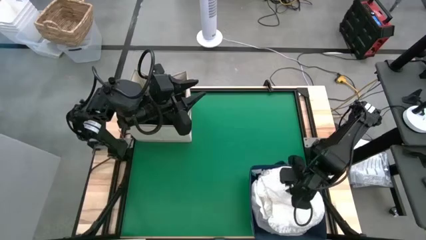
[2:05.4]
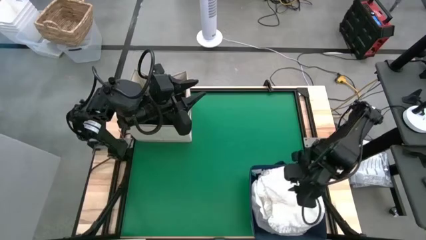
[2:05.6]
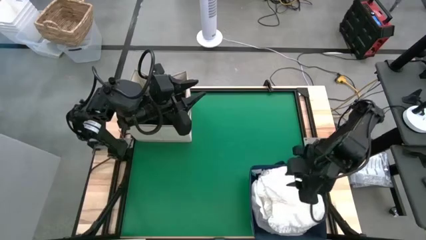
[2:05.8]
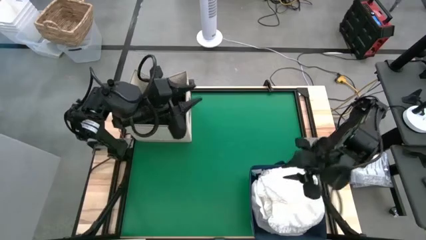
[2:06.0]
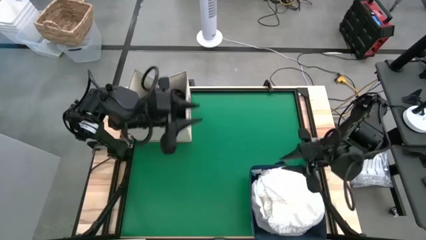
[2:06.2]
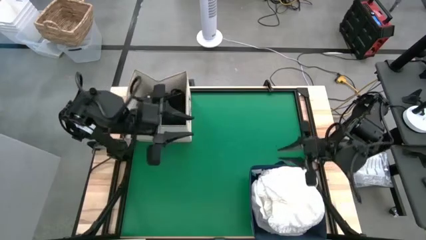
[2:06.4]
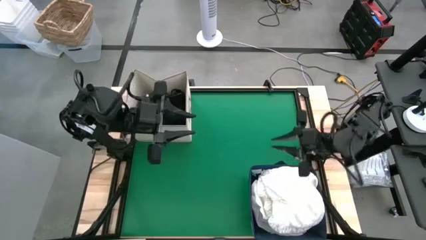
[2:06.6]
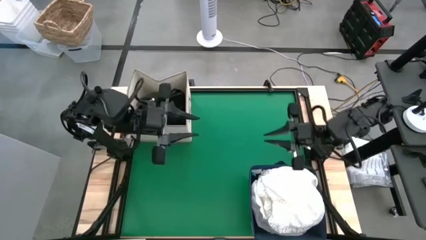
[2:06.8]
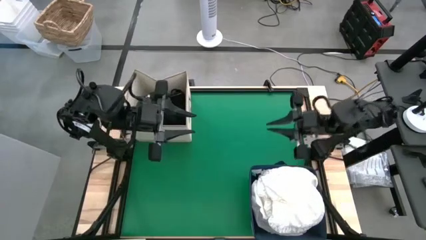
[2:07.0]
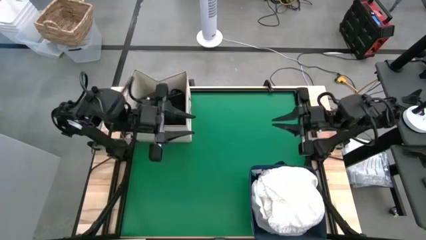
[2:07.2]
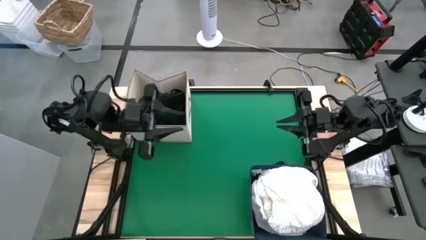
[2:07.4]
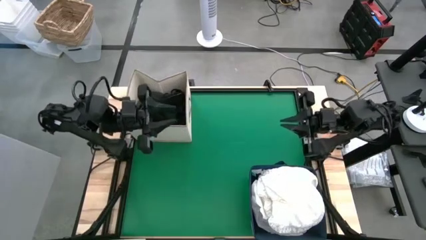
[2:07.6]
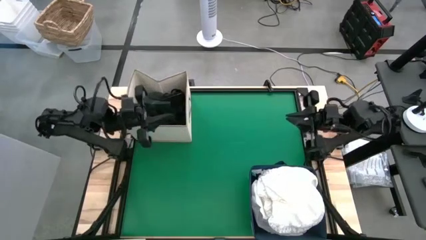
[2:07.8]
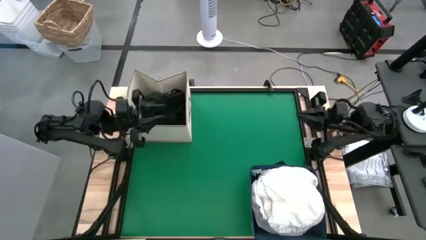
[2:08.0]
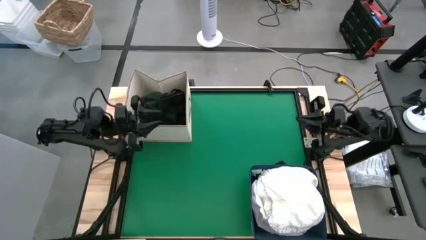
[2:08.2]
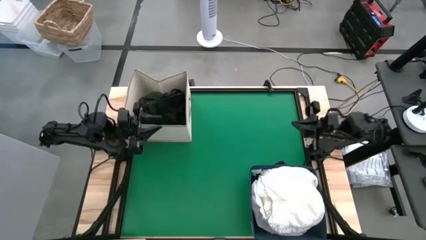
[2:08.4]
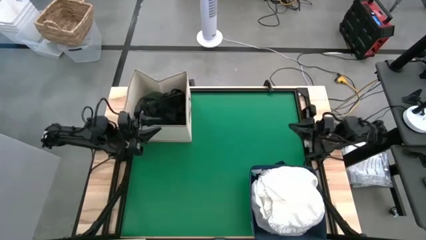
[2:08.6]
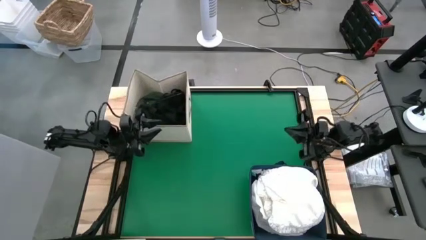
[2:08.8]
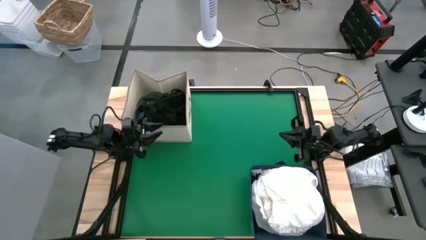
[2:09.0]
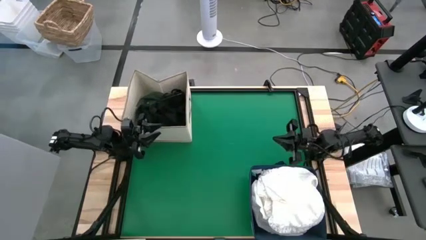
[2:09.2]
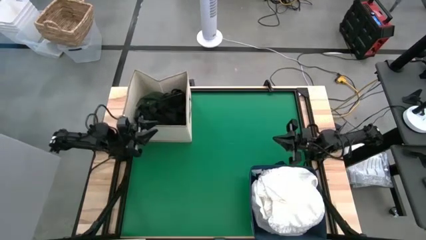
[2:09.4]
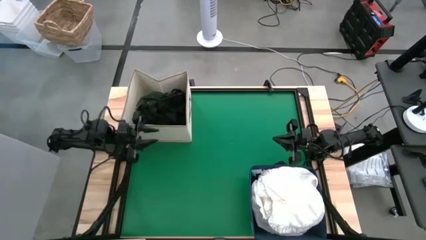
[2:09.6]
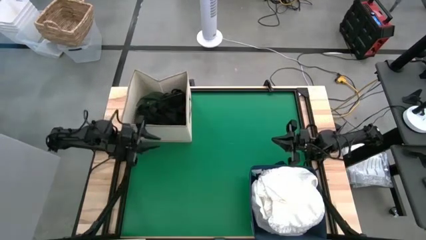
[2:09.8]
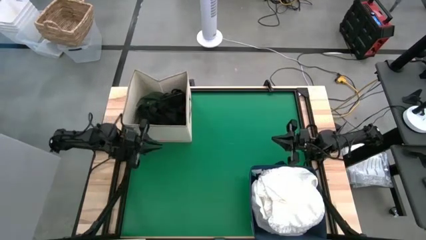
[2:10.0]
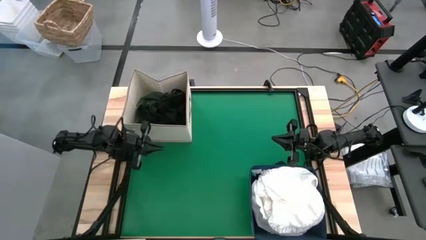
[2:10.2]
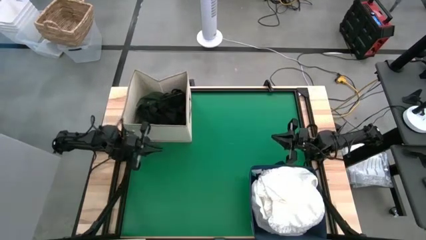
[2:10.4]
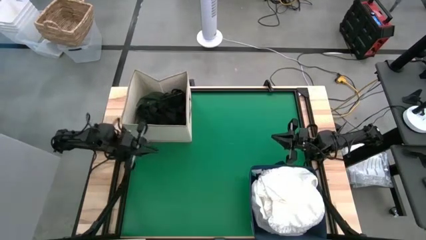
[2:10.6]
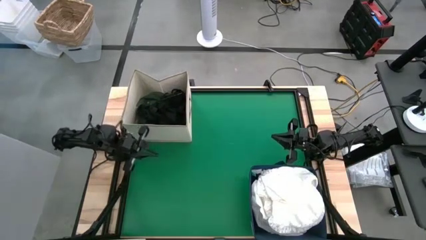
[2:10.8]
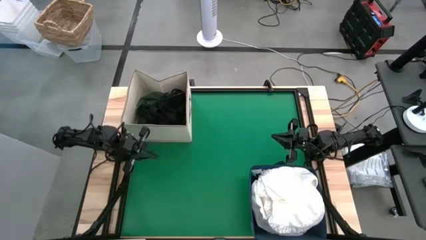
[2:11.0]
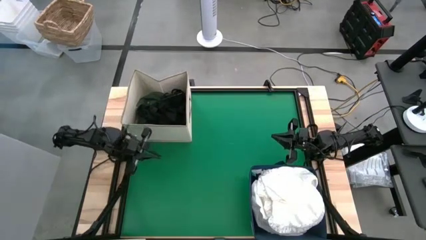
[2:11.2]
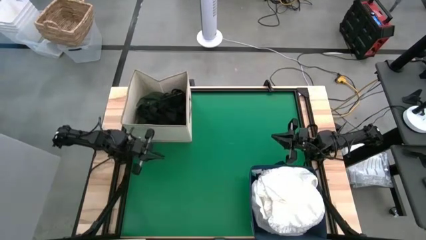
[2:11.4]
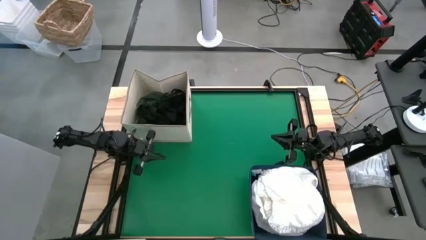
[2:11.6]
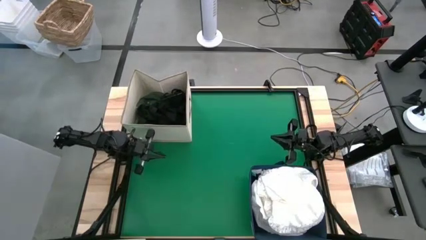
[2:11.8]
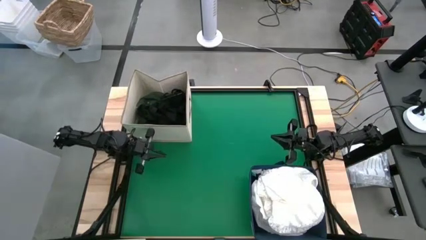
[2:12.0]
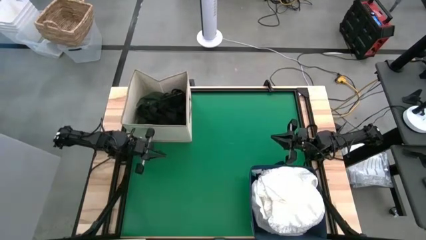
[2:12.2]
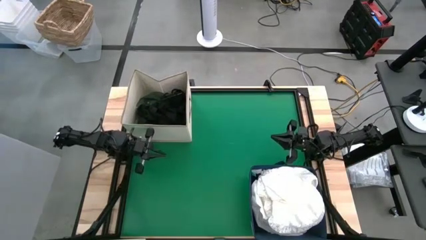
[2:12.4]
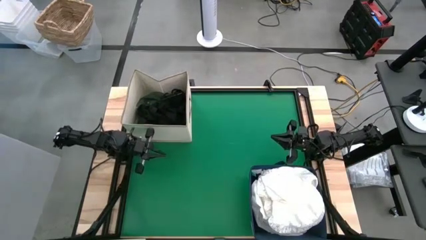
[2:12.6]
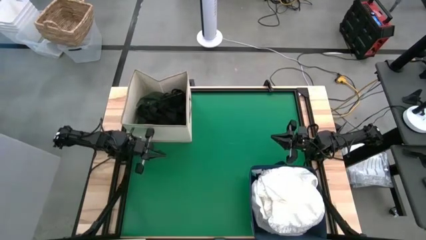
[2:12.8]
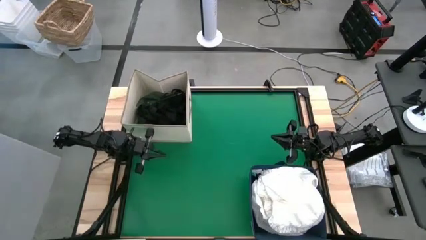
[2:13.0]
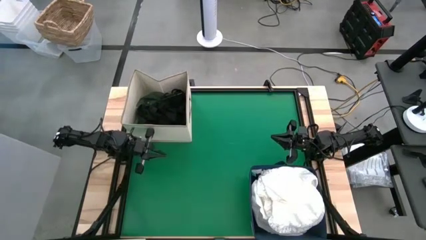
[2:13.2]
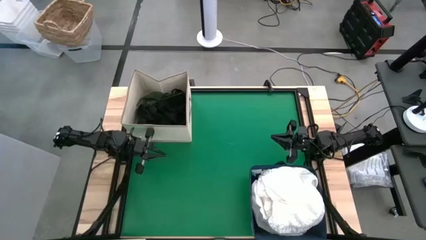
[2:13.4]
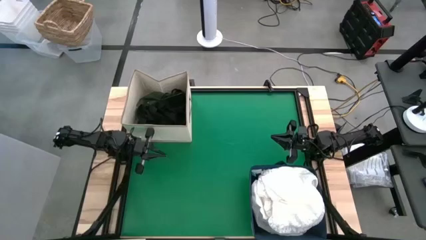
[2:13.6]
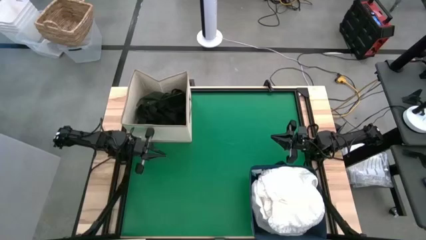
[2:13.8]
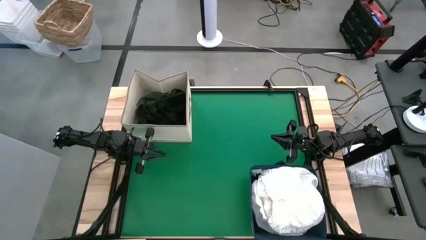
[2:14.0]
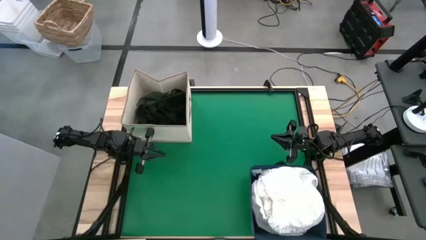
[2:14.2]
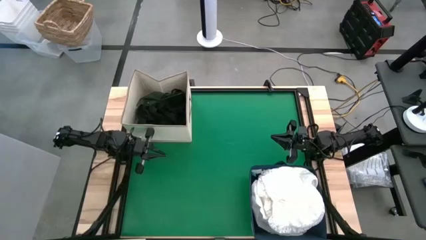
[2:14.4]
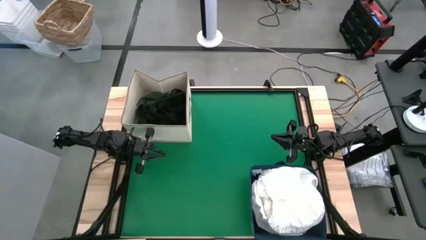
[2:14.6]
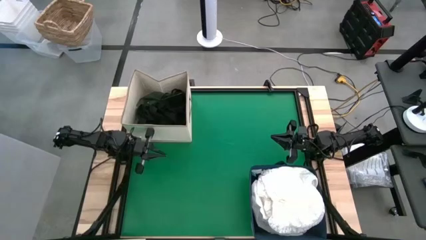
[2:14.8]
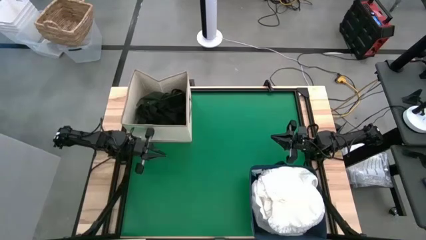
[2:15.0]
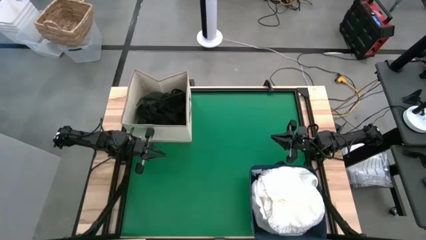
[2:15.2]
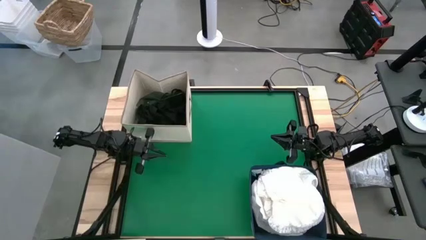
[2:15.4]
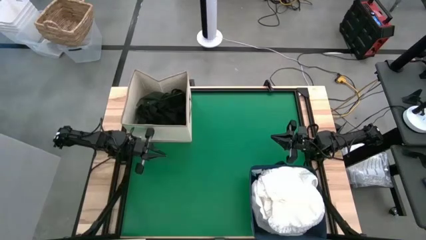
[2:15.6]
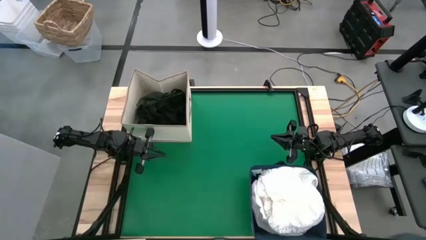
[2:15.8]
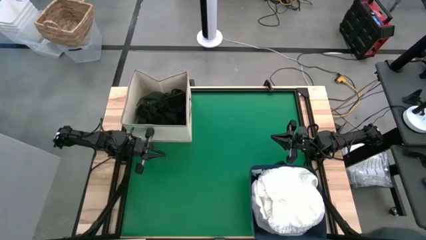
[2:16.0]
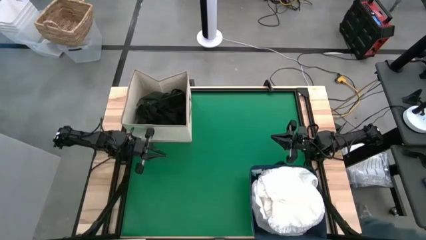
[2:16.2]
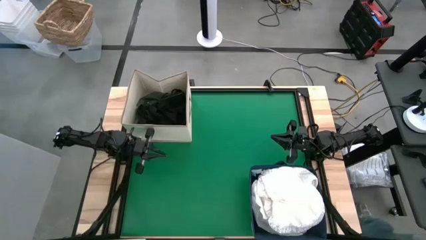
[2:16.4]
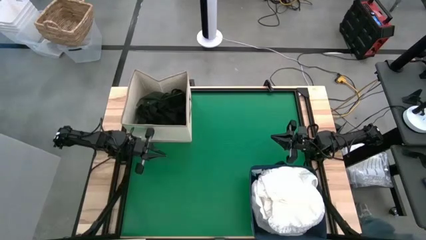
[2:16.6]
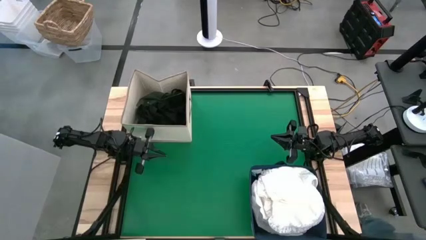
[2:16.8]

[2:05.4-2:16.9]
Return to Home Position
